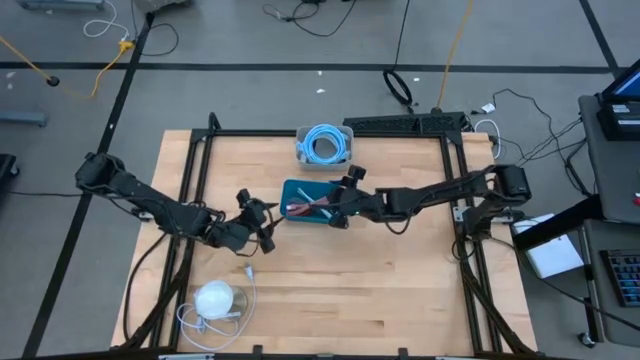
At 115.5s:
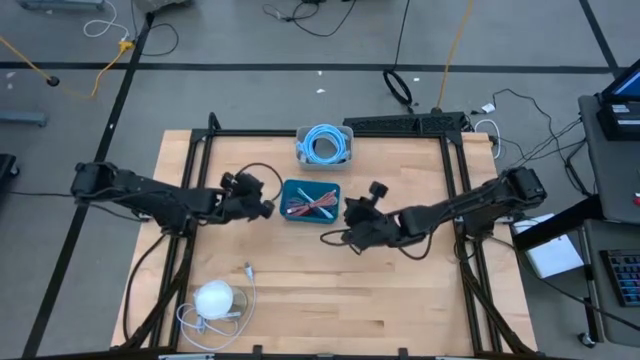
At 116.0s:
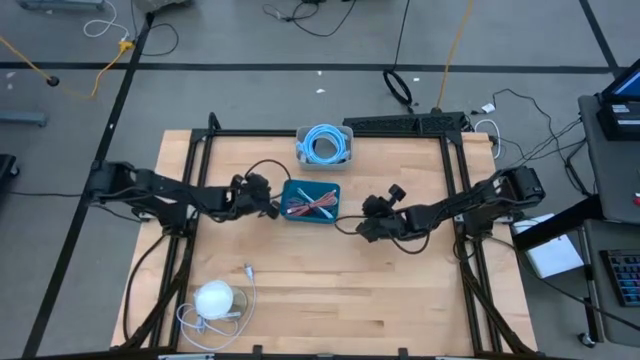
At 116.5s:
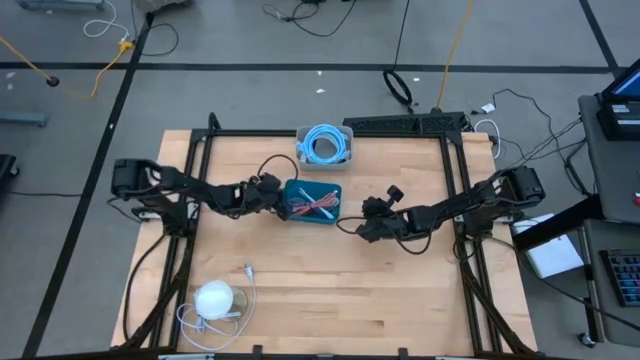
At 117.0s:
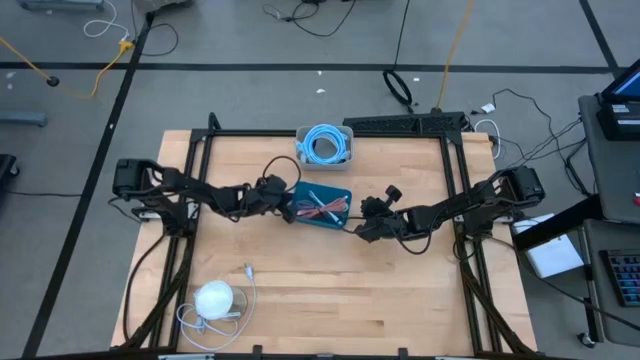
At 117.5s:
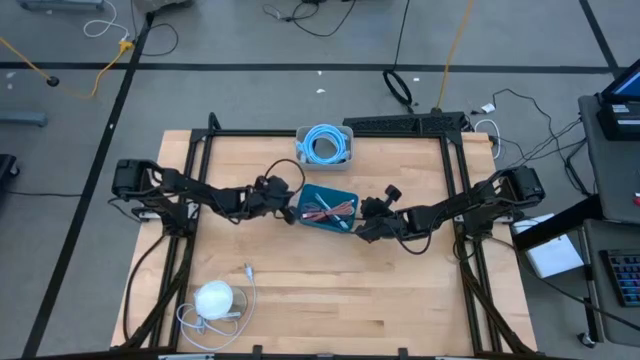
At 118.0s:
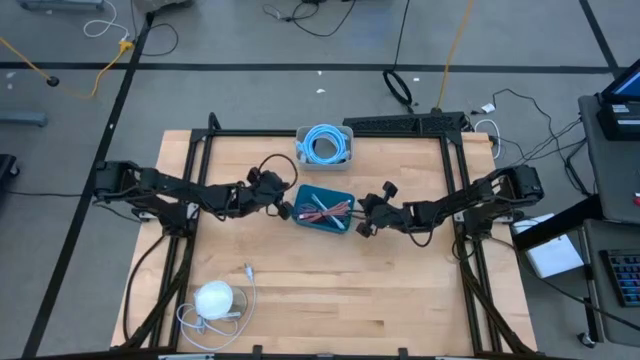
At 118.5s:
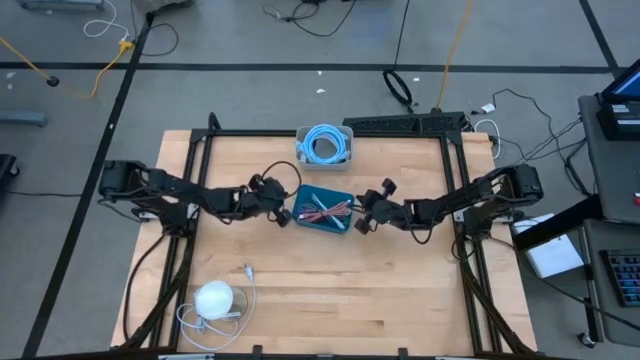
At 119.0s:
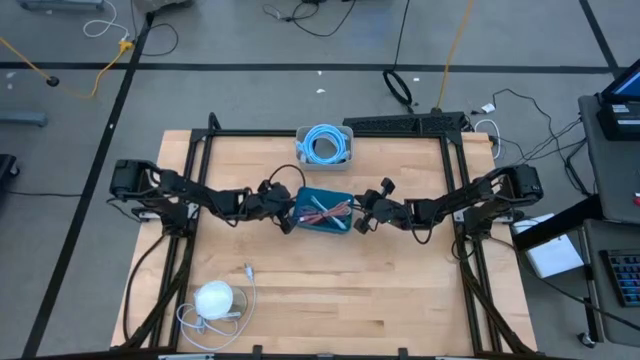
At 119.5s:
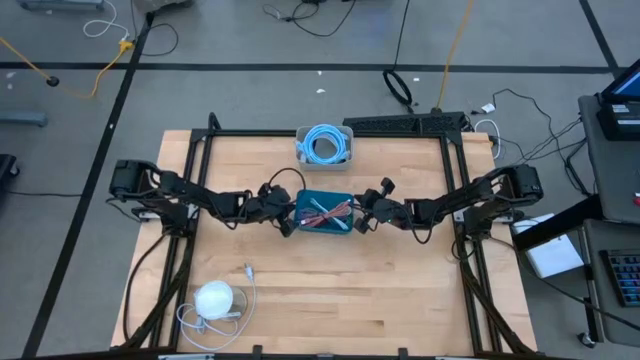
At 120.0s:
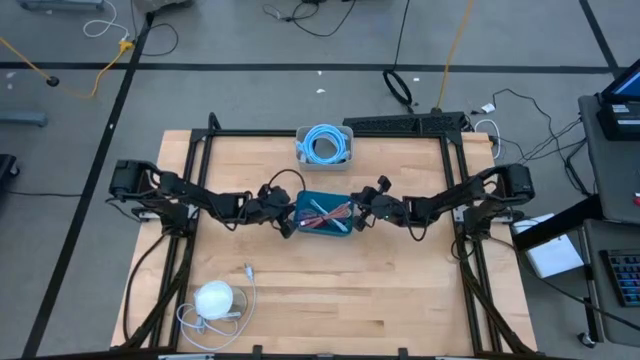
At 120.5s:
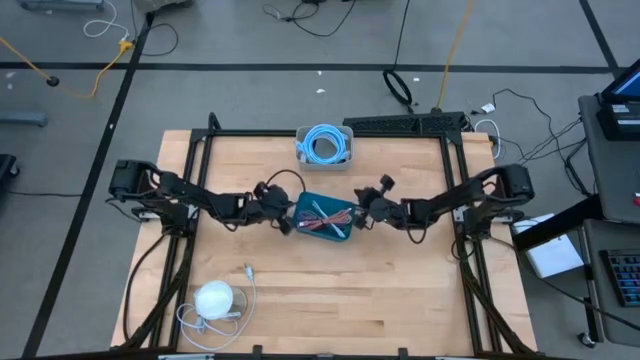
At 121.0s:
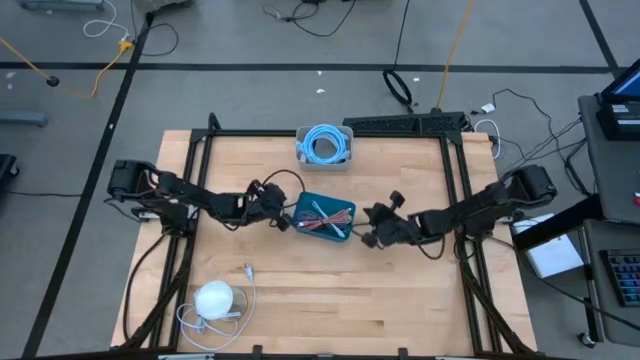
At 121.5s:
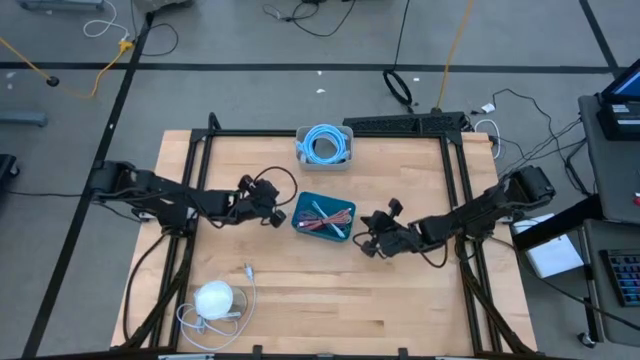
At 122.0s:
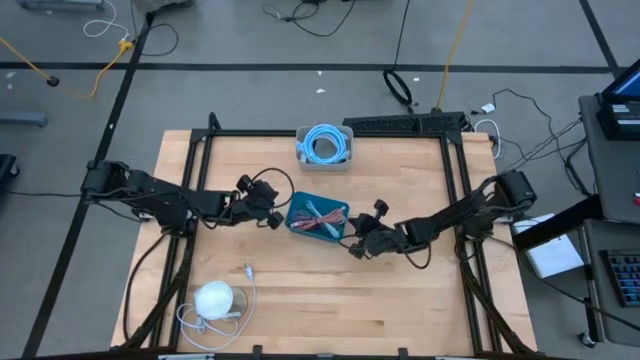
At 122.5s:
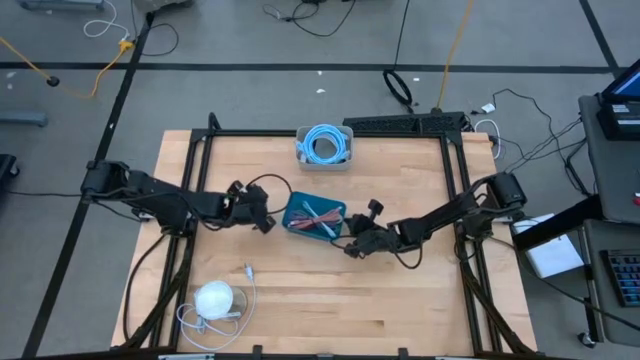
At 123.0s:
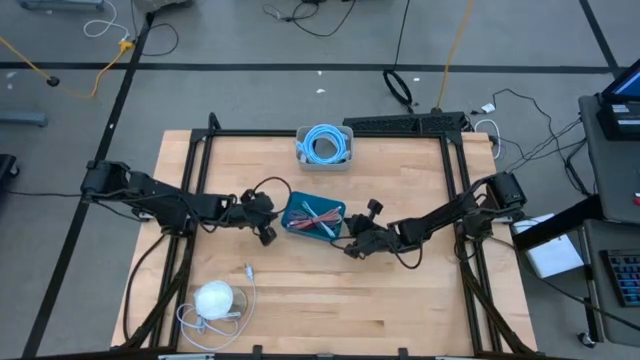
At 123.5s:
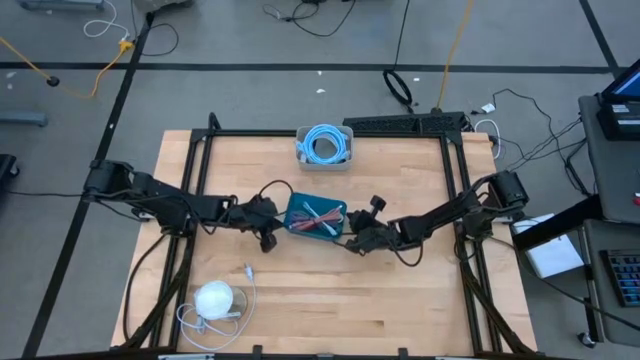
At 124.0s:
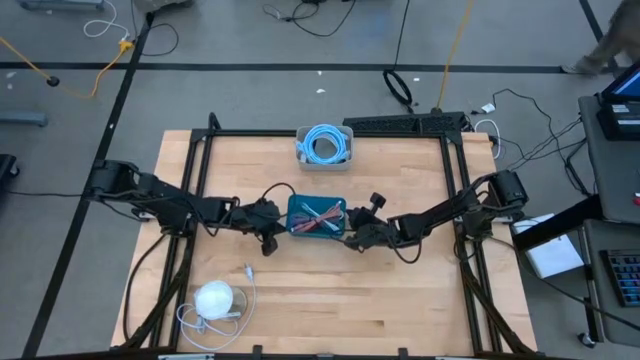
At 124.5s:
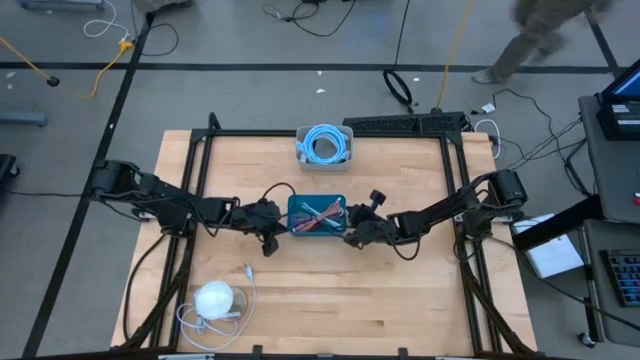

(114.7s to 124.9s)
Task: Pick & Place USB Port
Adjust the blue bin

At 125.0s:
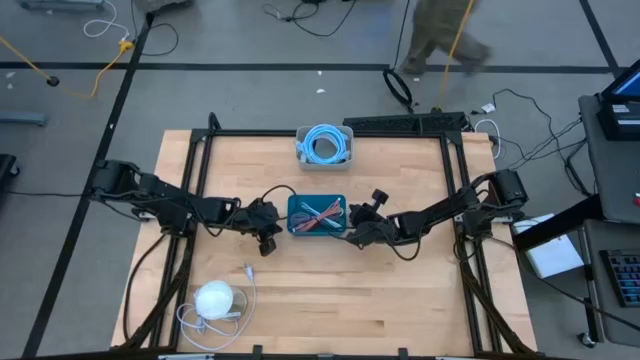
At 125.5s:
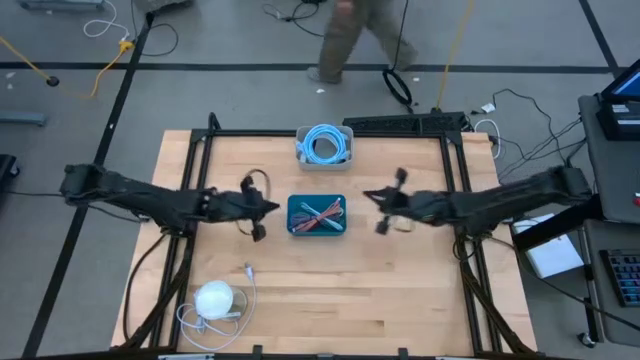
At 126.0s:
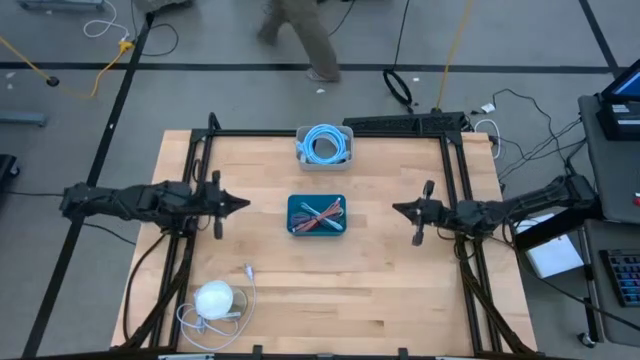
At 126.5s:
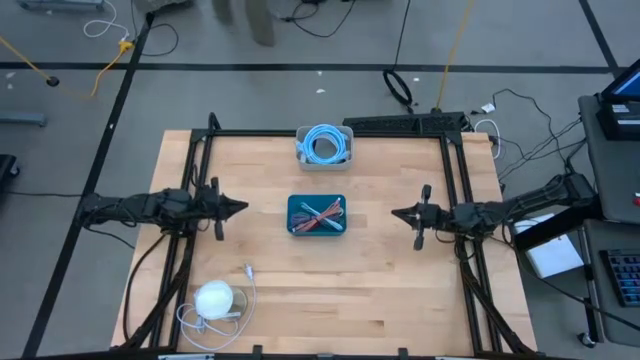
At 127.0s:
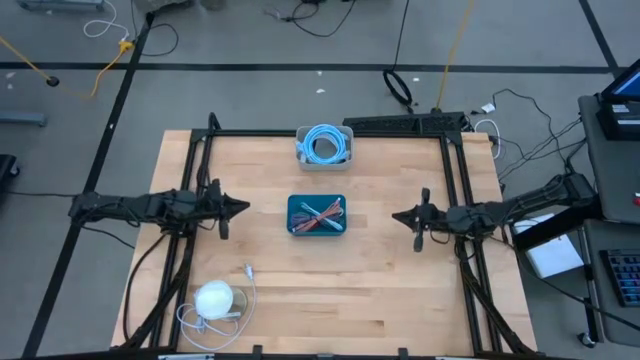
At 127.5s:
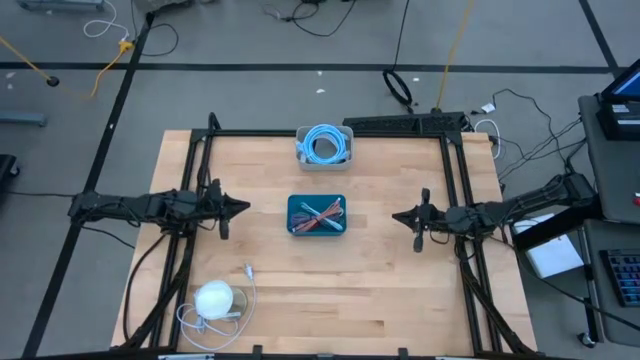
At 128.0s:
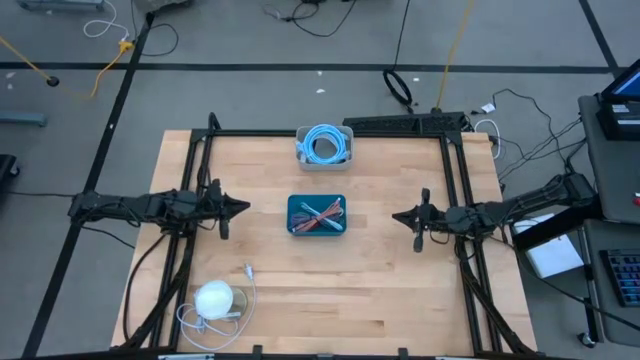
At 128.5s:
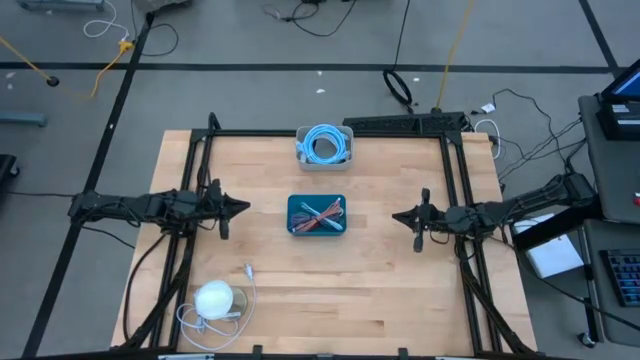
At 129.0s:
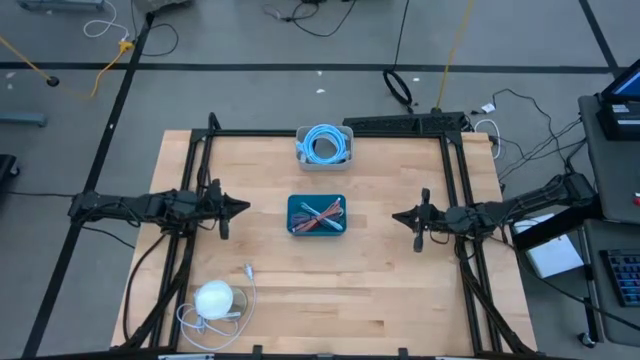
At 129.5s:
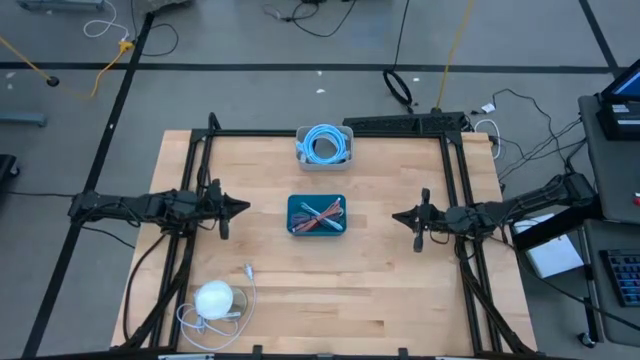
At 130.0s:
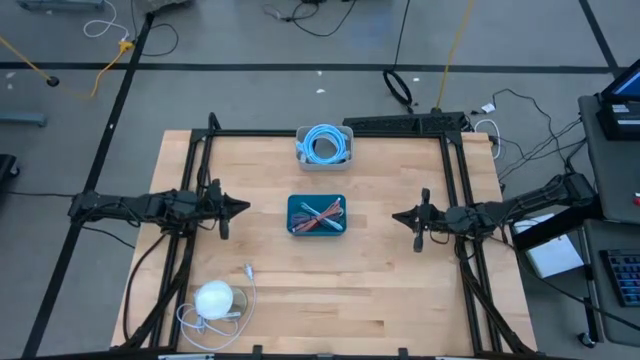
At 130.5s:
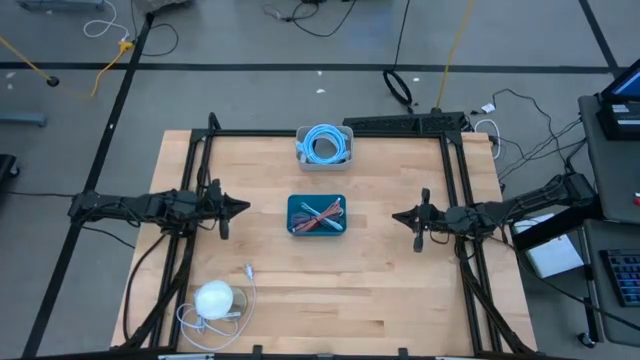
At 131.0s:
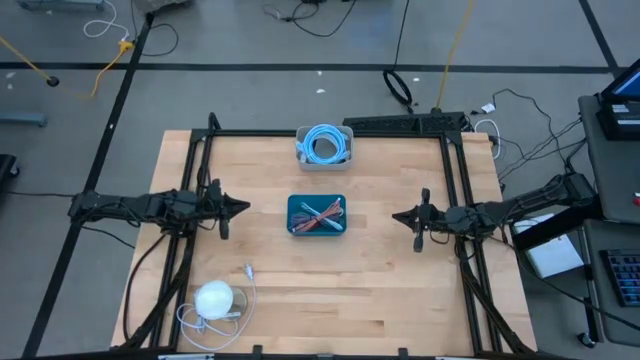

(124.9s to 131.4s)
Return to Home Position

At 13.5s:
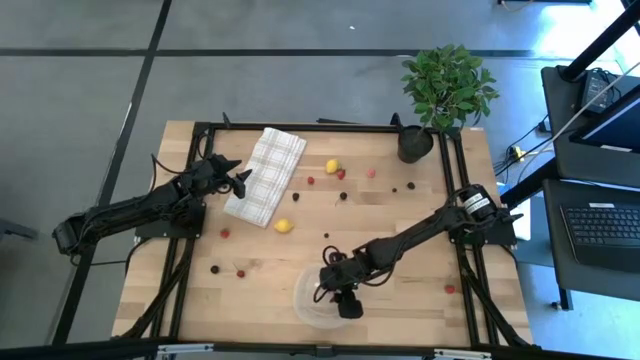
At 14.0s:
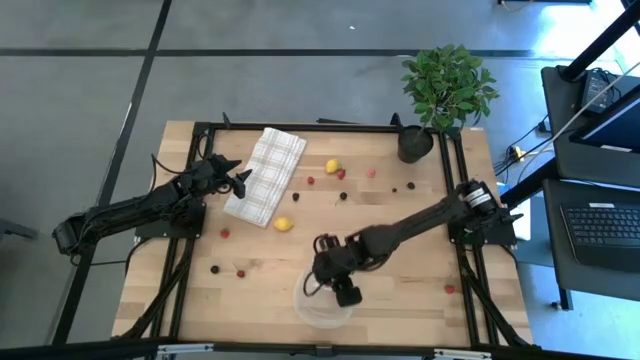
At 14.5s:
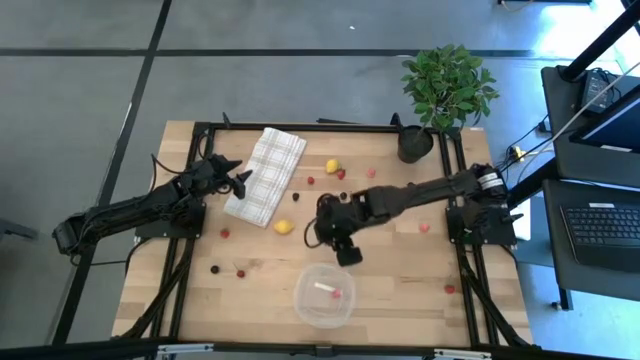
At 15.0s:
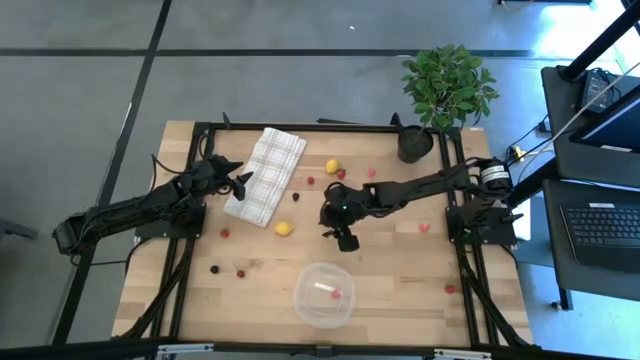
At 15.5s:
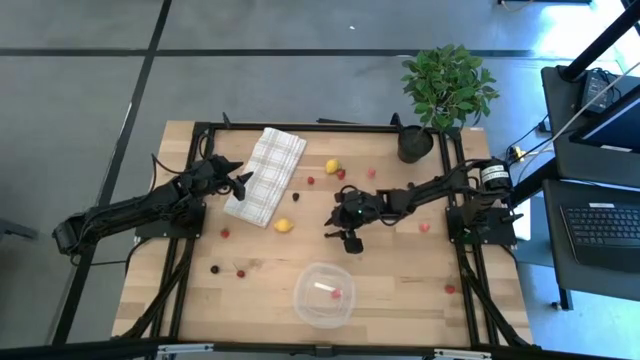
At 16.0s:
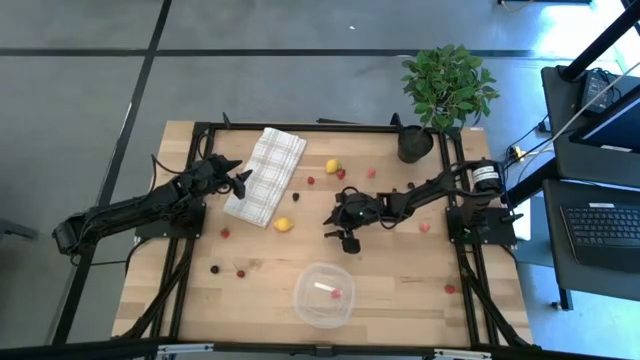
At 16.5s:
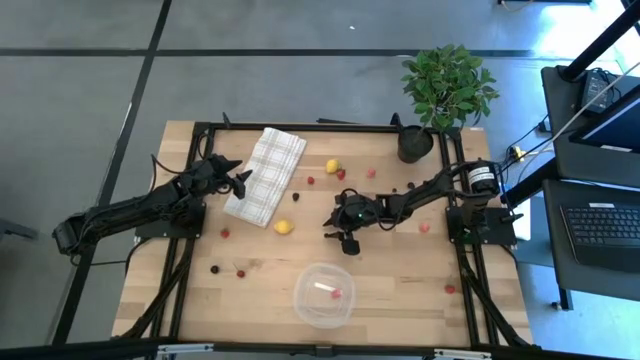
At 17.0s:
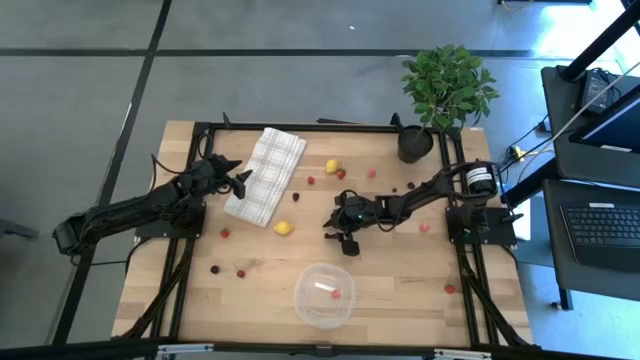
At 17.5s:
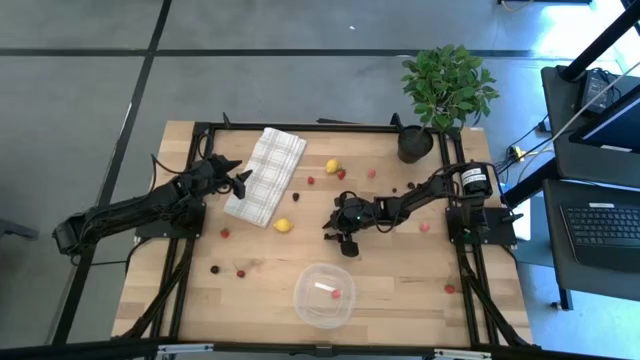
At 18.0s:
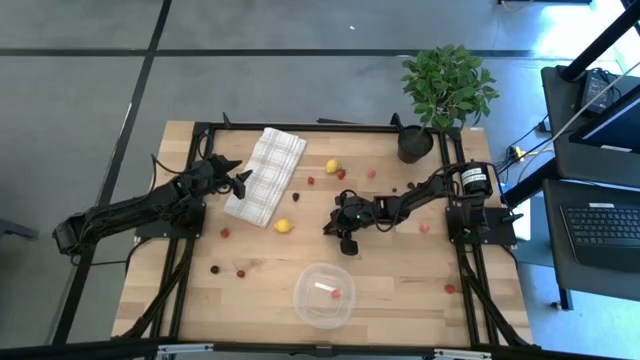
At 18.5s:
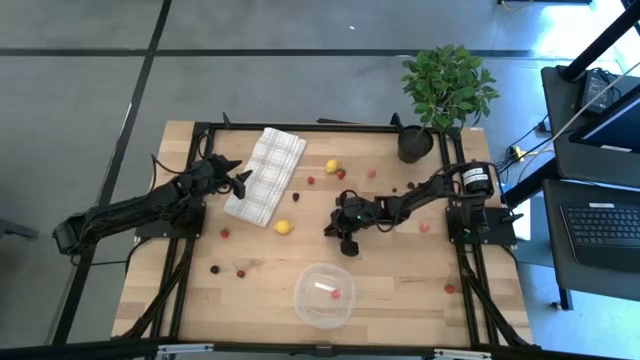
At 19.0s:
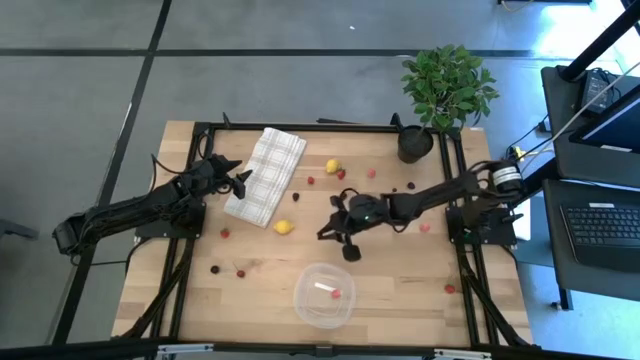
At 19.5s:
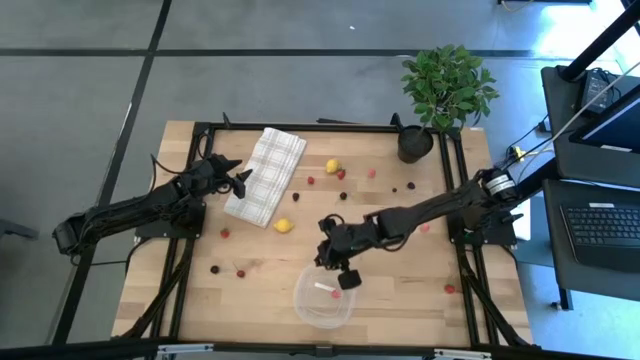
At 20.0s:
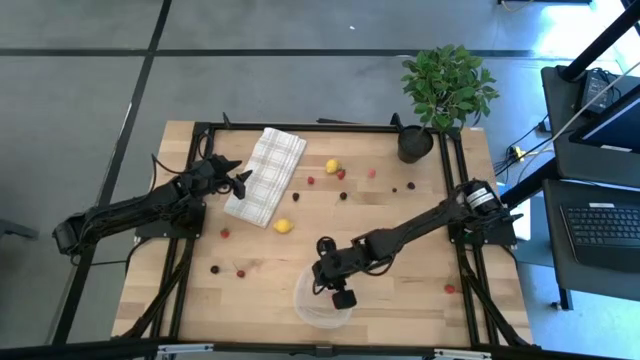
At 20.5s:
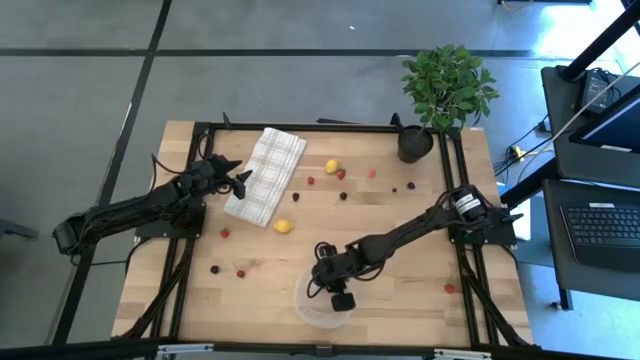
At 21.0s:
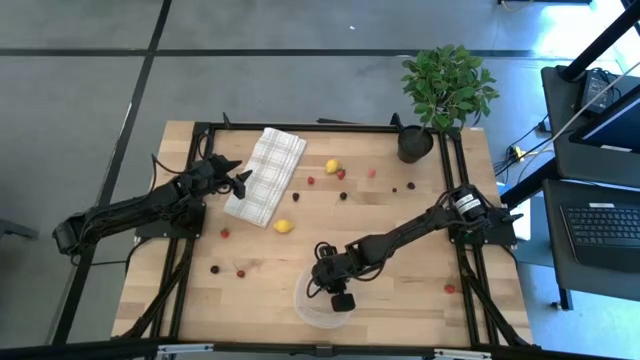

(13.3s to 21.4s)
Task: Pick and placing Produce into tupperware
Put the bottom blueberry into the transparent bin
